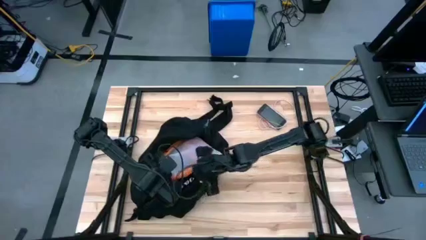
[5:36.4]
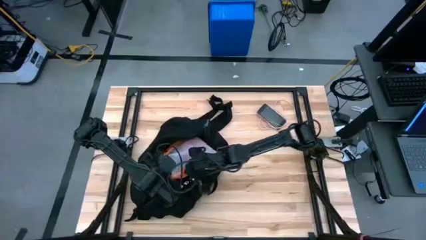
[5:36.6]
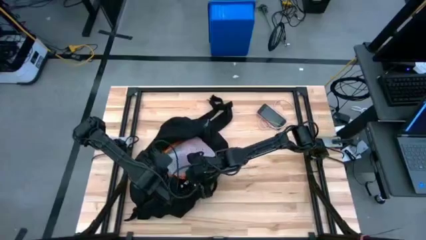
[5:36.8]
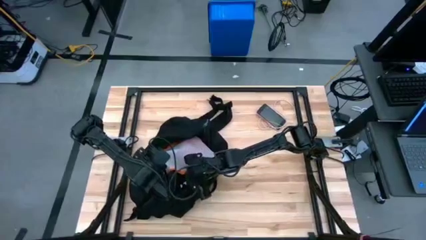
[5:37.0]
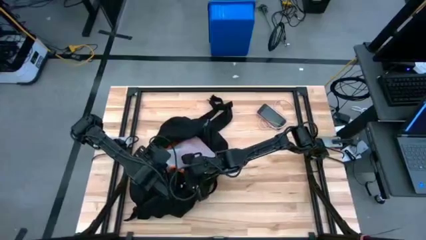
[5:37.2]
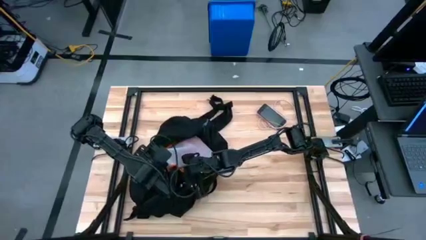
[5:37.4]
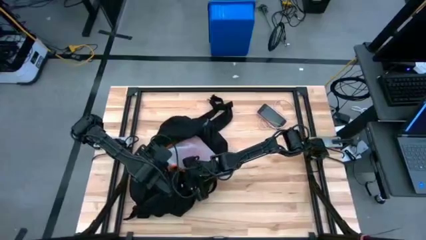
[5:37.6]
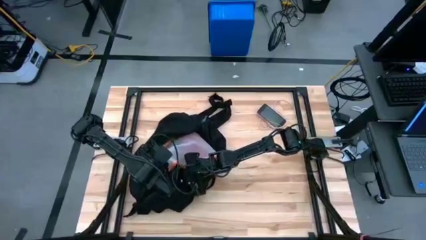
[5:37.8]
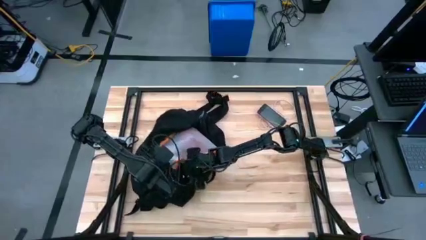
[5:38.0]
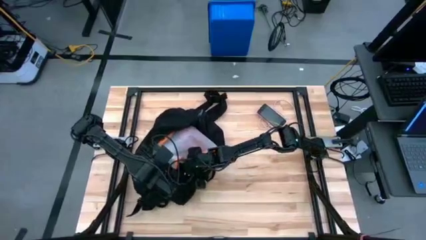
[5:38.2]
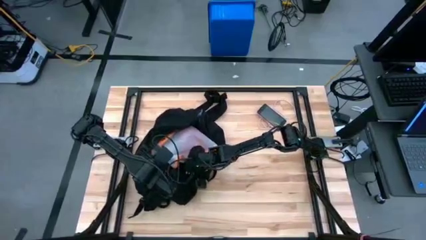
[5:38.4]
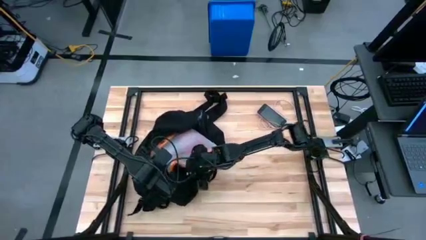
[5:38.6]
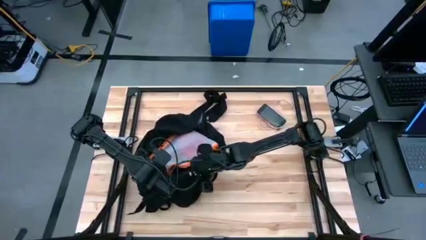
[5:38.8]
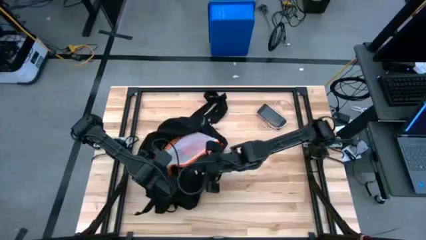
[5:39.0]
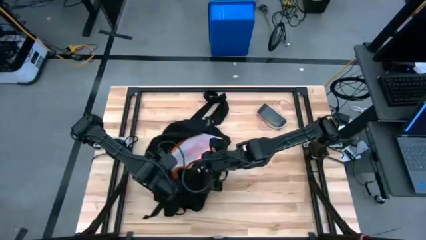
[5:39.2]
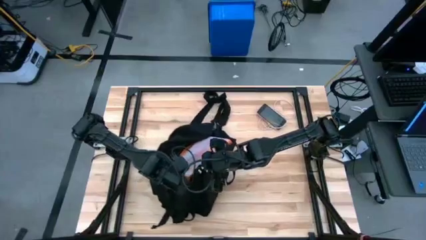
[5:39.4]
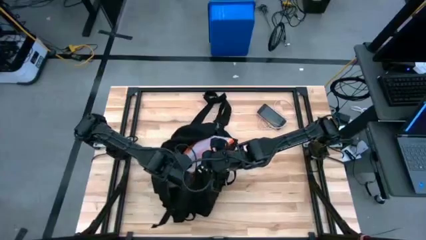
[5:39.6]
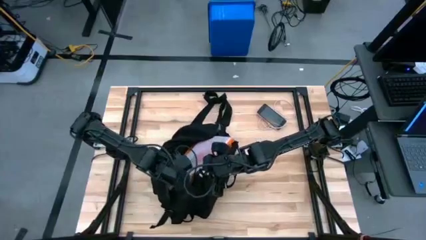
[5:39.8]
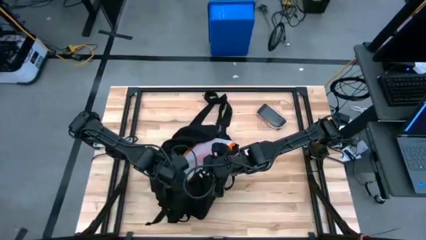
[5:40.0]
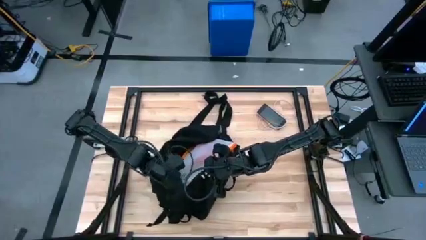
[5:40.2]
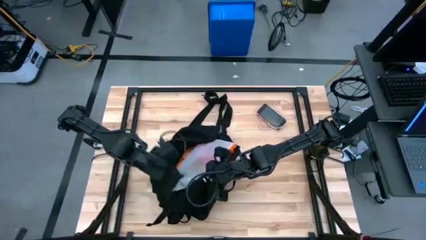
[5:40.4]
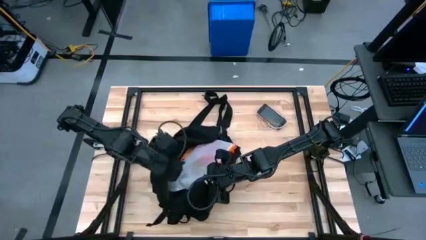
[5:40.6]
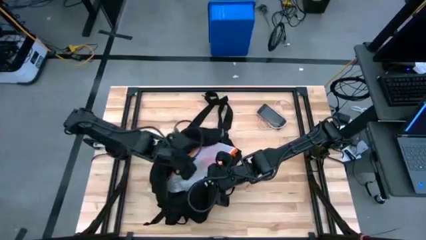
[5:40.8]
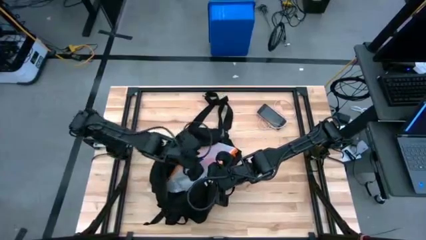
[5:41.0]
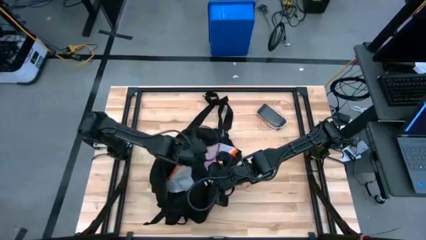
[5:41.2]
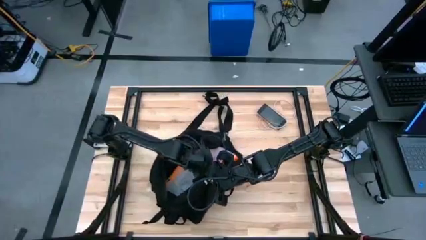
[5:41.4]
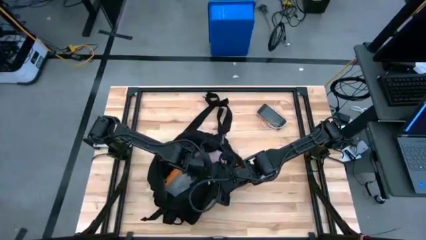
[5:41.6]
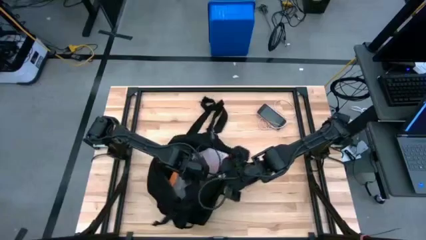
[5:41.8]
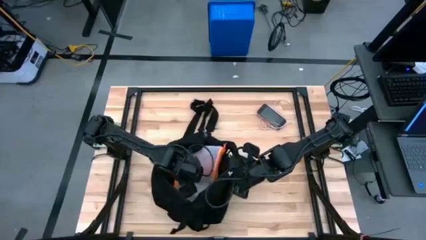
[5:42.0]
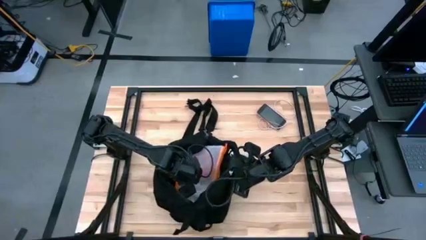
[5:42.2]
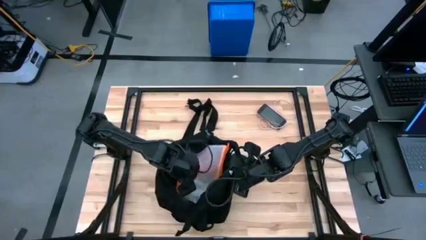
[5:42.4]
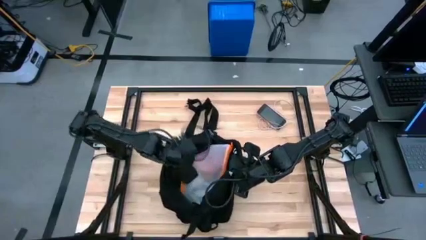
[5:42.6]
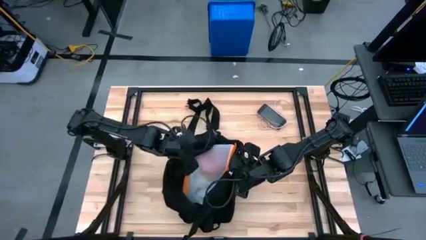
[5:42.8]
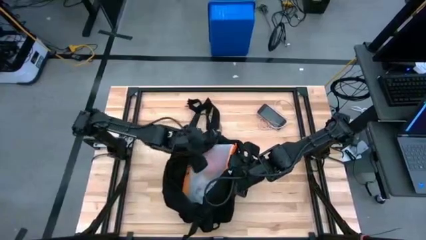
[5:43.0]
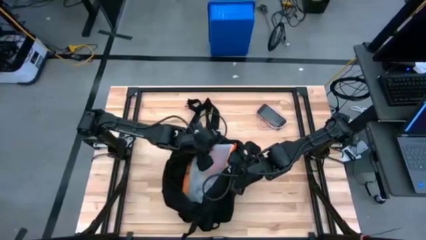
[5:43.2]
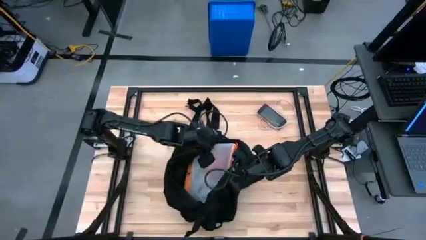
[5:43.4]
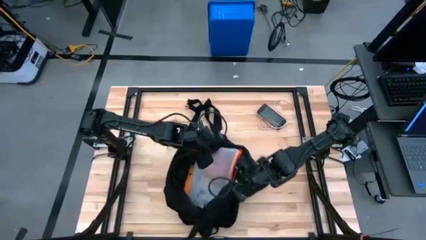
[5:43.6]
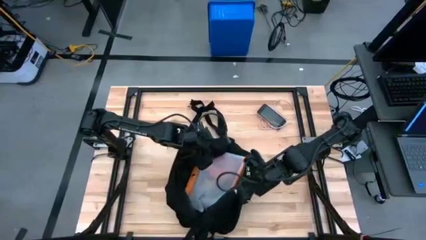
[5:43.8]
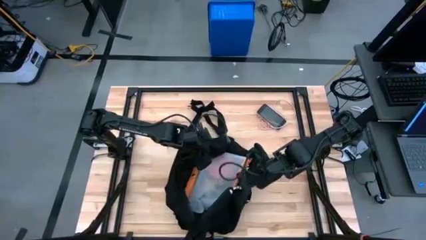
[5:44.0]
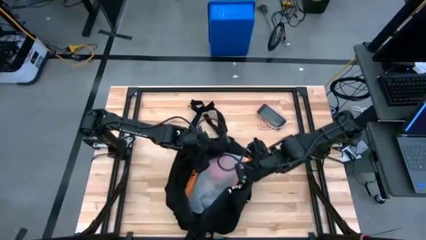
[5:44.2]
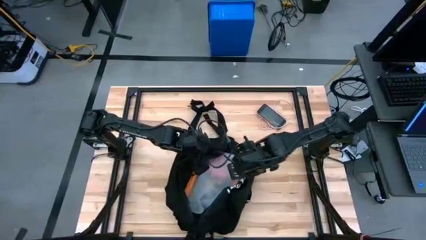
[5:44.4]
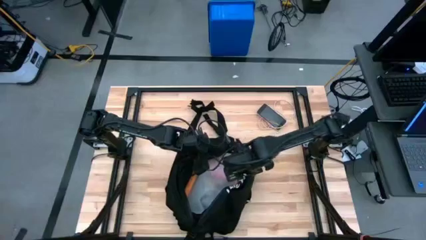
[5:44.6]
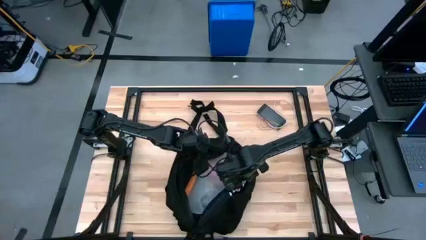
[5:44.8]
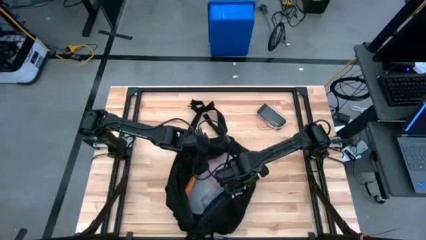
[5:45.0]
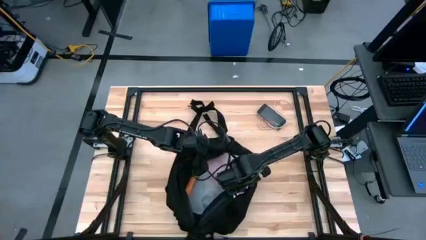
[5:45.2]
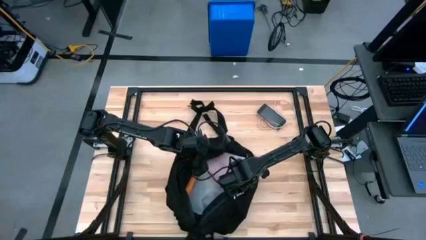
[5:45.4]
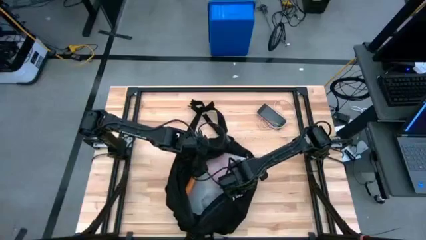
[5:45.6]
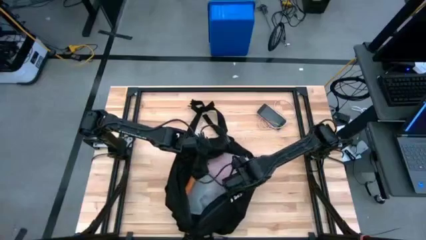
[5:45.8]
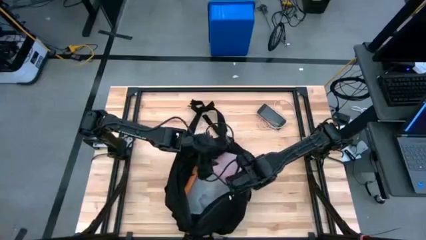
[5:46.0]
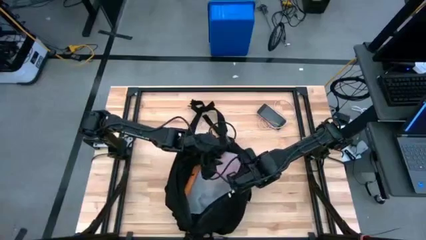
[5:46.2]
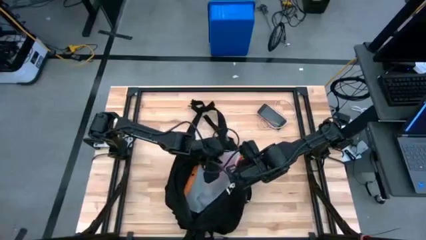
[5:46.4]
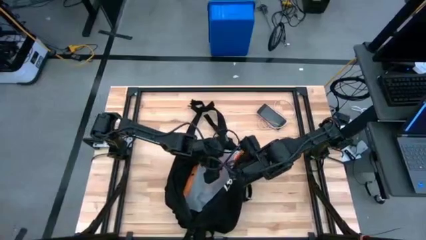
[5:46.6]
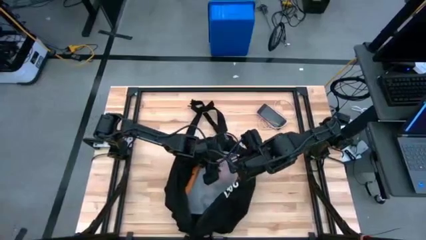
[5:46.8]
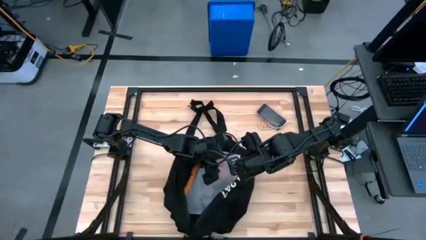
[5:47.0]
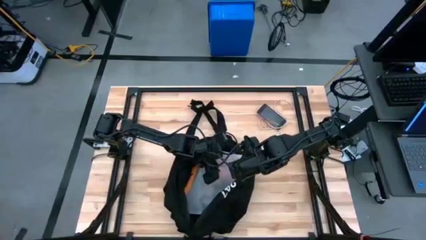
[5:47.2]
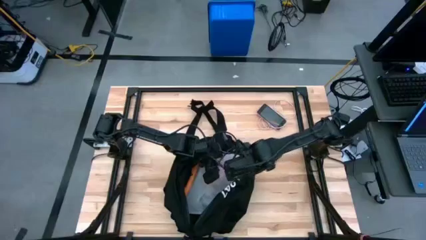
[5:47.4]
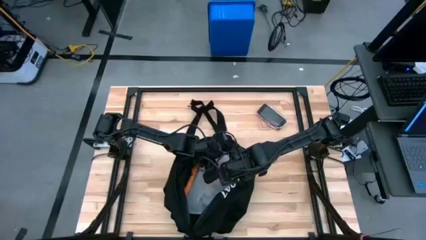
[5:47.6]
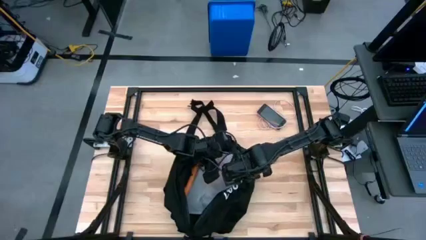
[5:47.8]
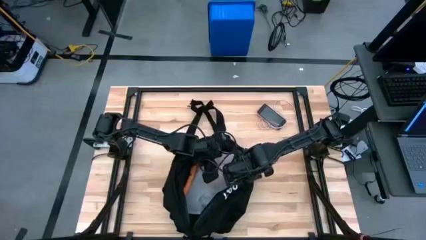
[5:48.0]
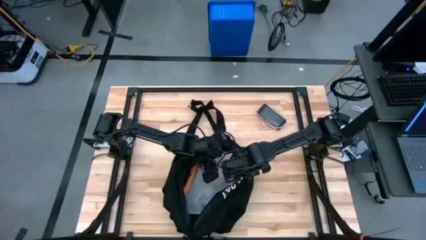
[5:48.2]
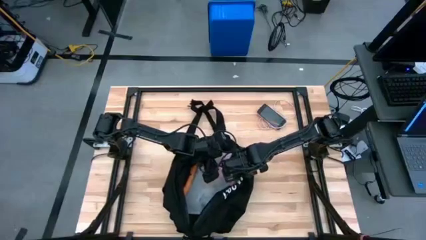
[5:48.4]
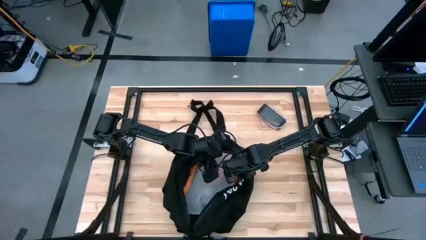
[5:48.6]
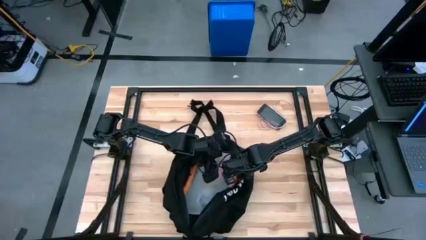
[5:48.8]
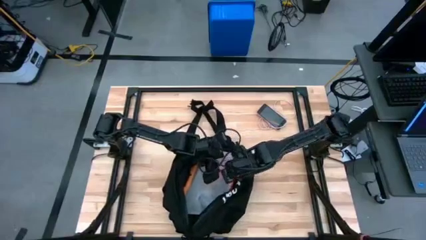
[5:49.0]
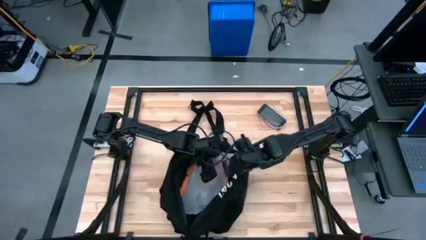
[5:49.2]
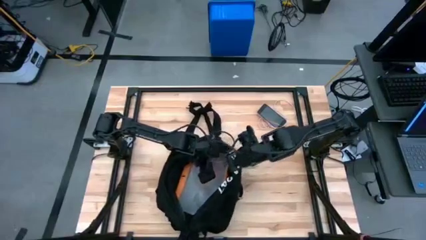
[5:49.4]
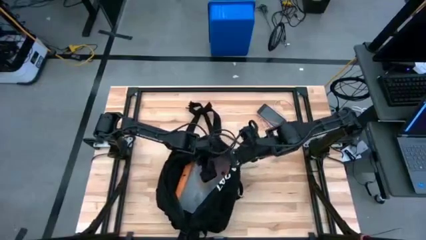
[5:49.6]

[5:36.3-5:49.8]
Task: Unpack backpack
Put the orange zip bag into the black backpack

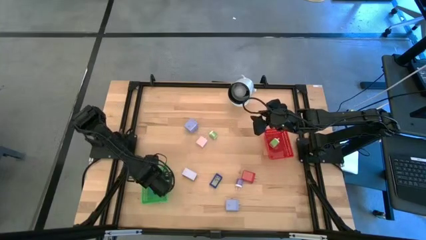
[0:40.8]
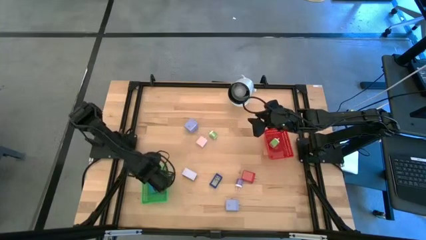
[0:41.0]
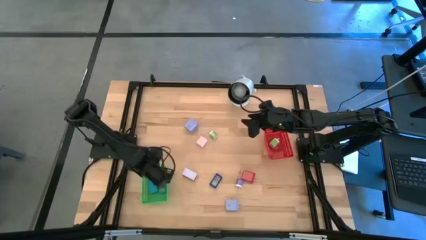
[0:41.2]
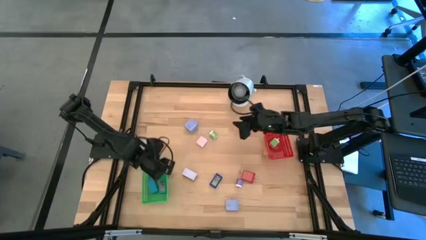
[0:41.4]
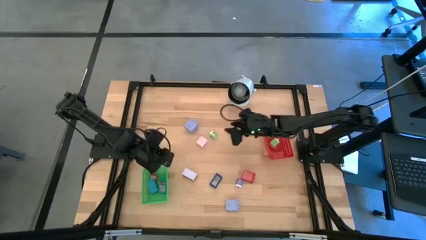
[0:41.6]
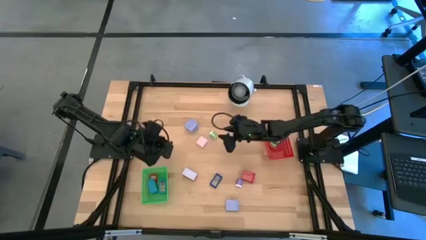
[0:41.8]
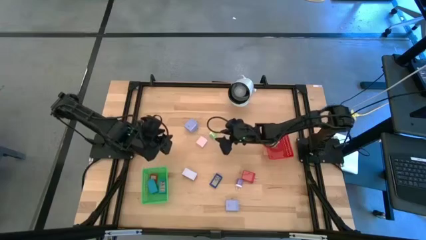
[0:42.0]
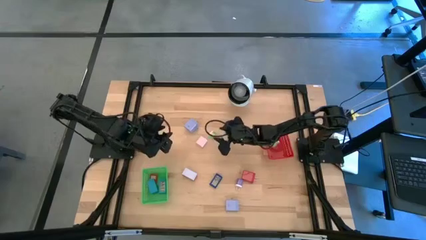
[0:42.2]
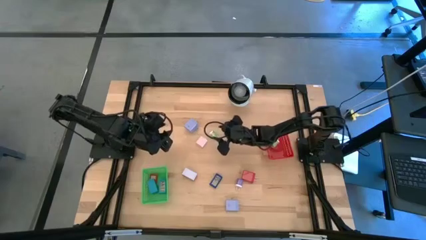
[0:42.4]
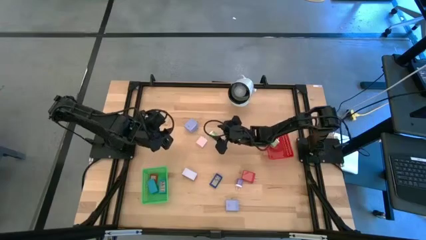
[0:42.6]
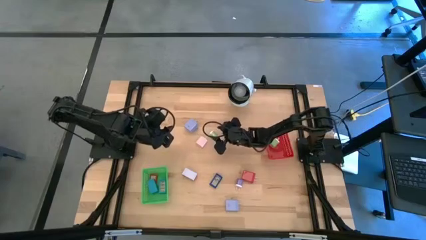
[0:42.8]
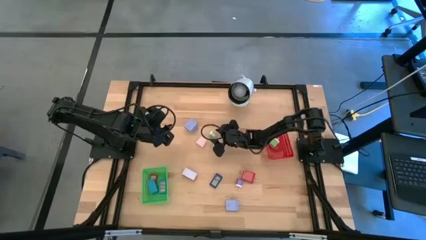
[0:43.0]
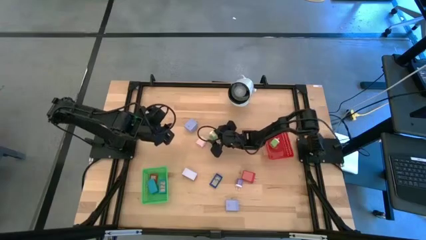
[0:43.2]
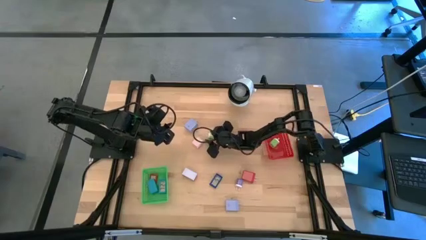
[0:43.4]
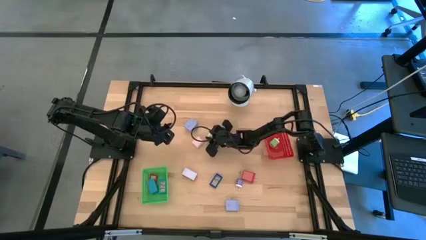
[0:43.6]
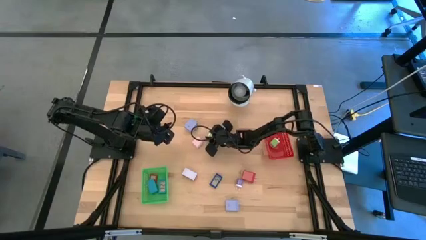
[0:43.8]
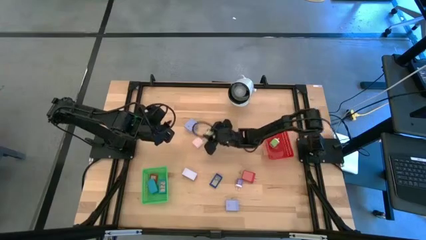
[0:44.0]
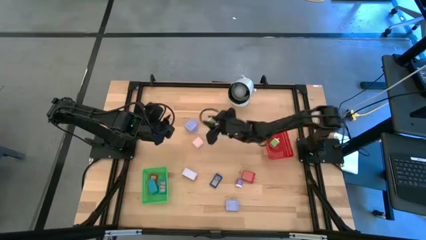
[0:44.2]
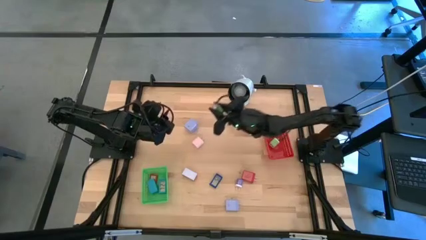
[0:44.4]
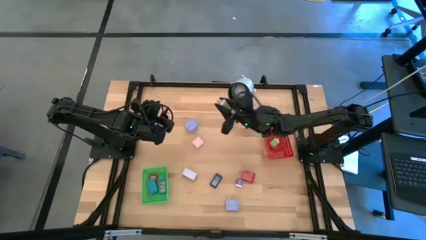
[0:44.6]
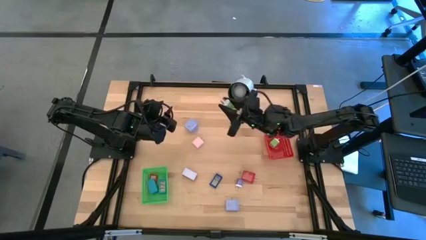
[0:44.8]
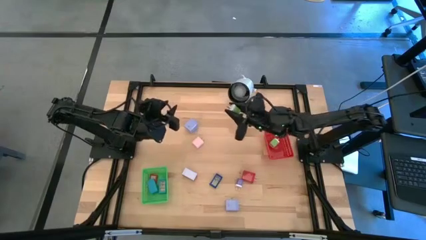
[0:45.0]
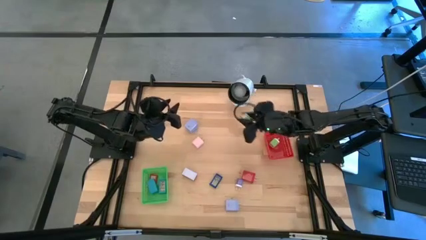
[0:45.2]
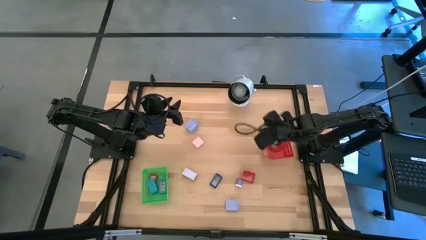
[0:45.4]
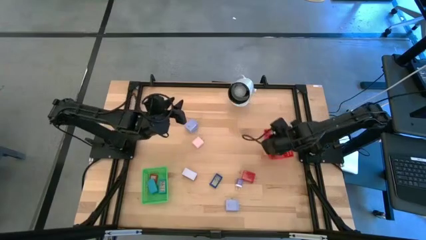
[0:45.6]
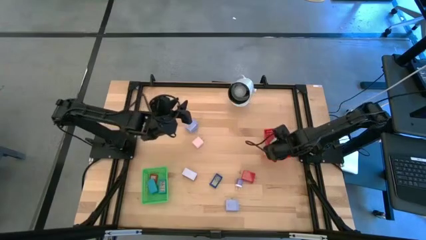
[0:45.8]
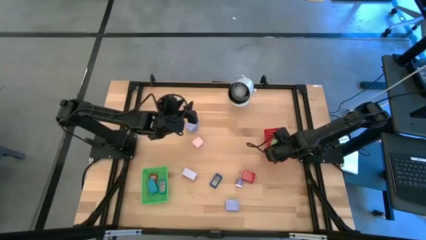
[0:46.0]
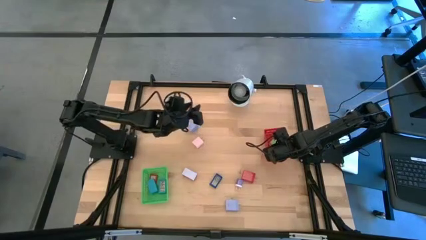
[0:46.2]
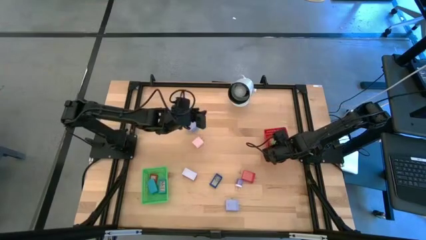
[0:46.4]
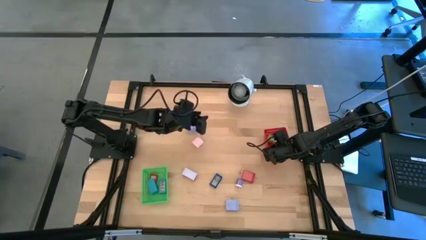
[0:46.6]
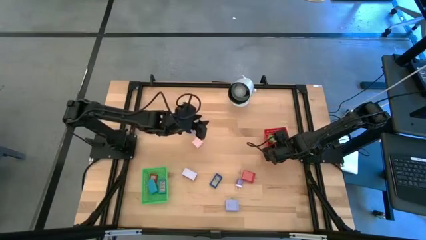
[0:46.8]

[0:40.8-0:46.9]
Task: Pick & Place Office items
Put the green charger adapter into the red bin
